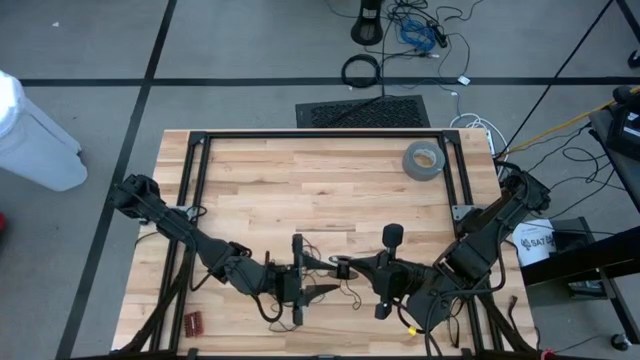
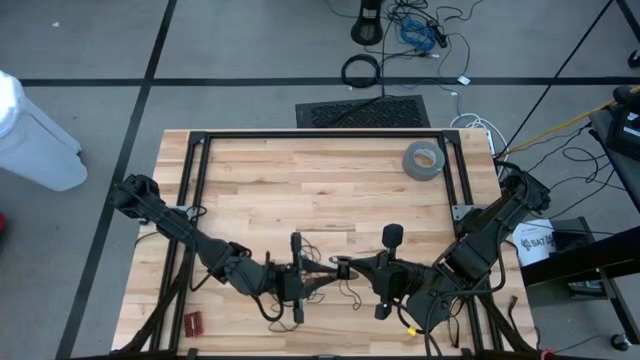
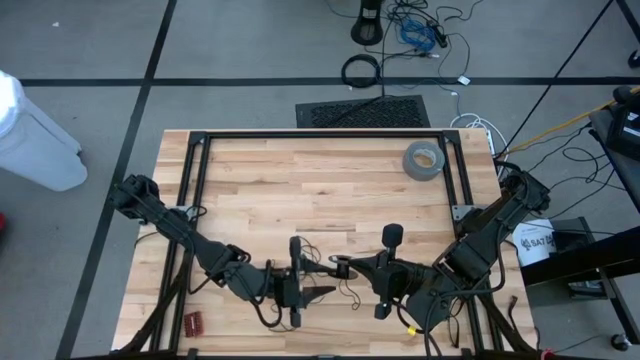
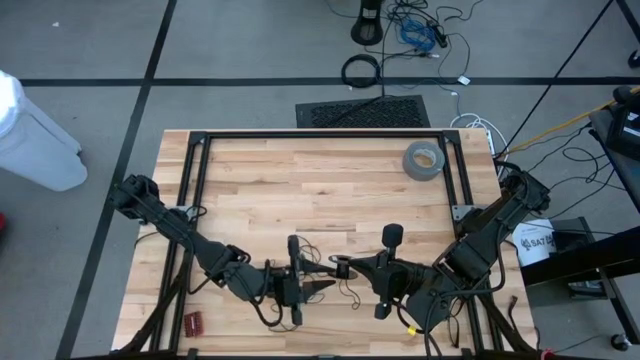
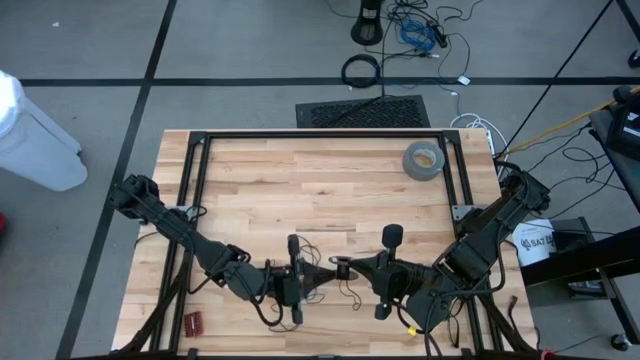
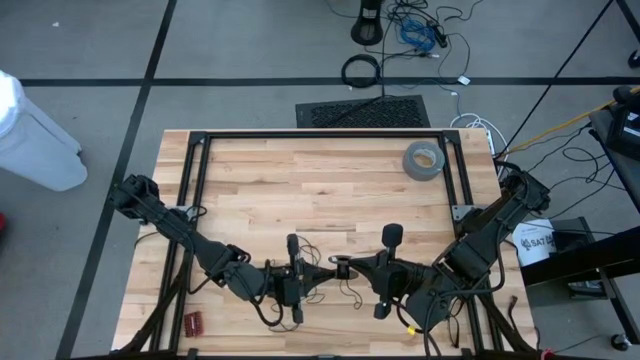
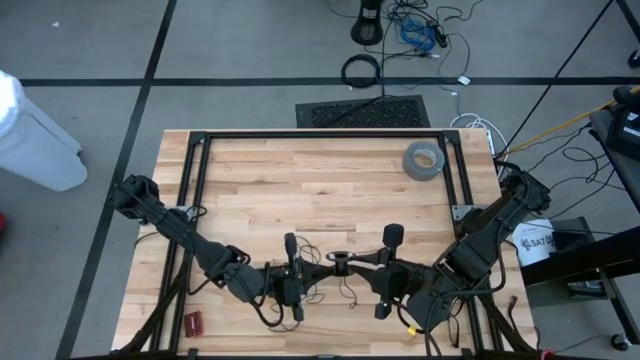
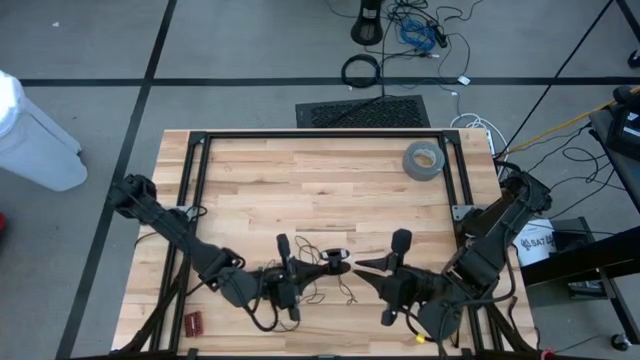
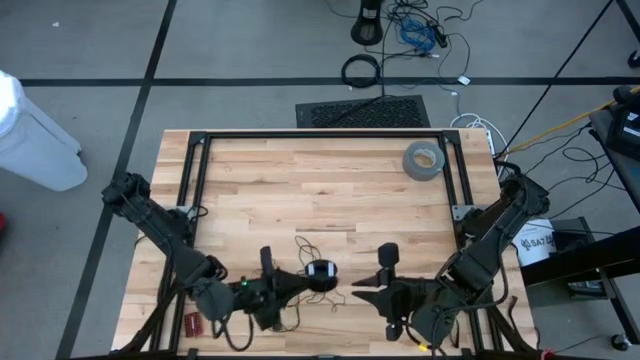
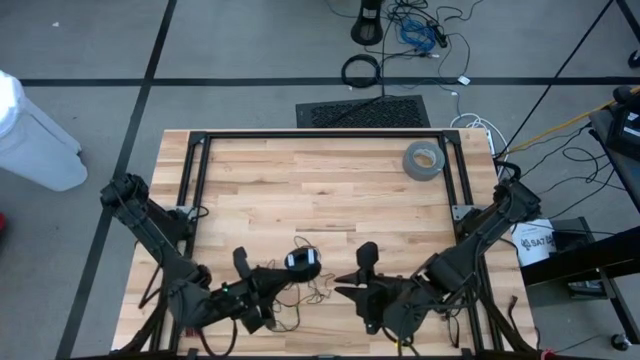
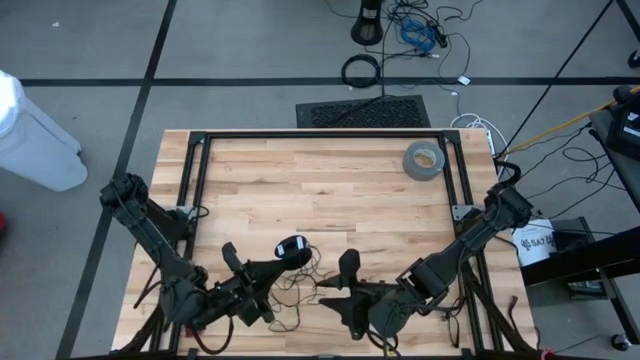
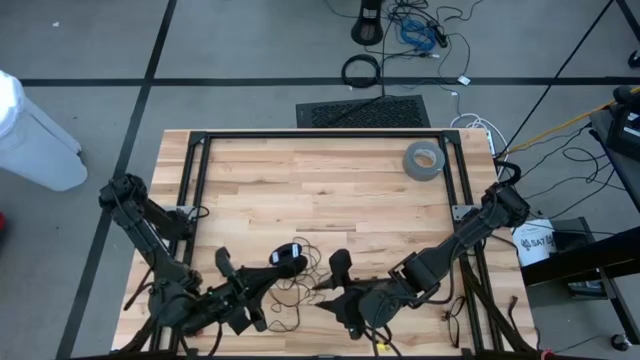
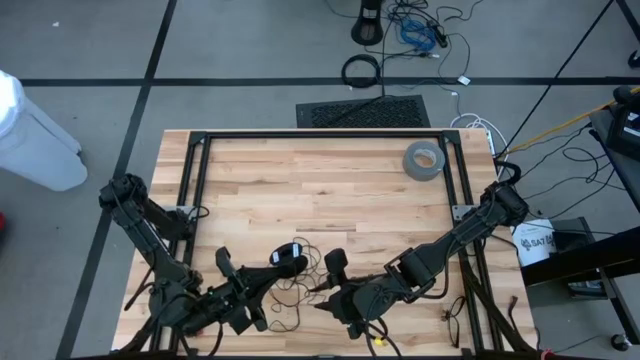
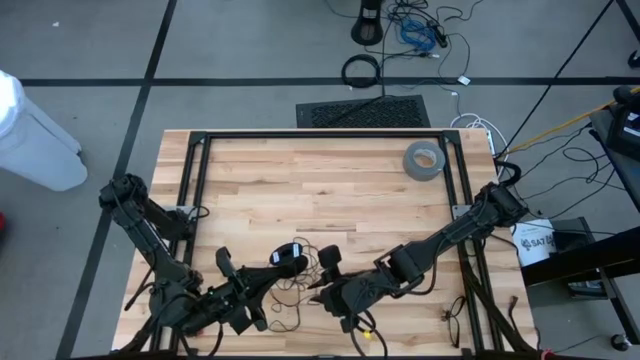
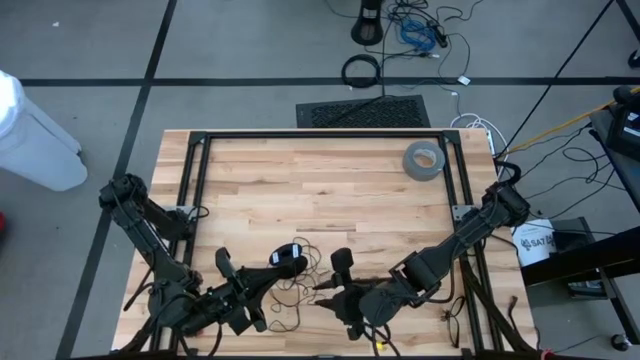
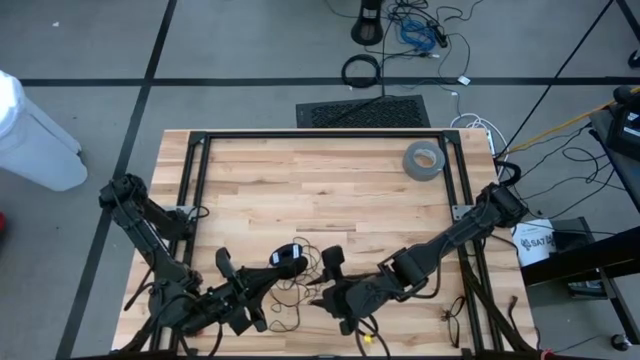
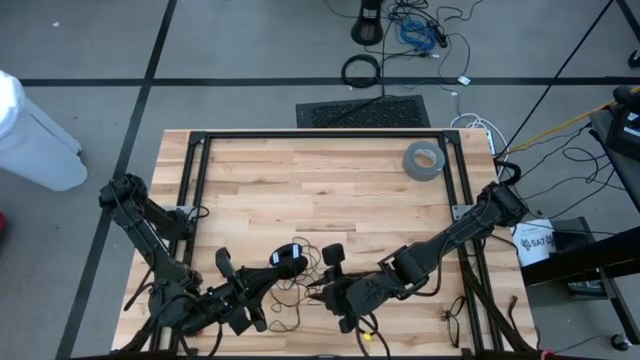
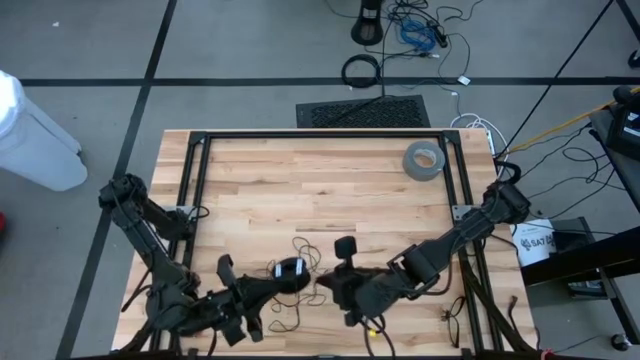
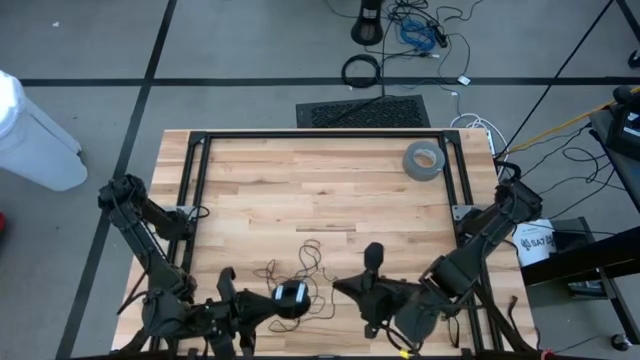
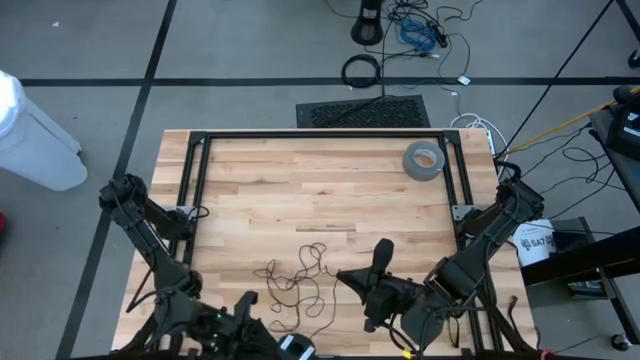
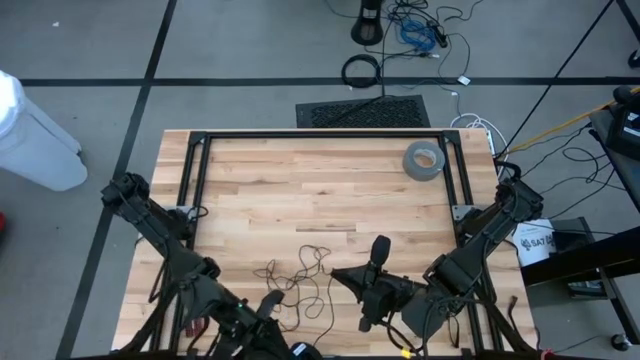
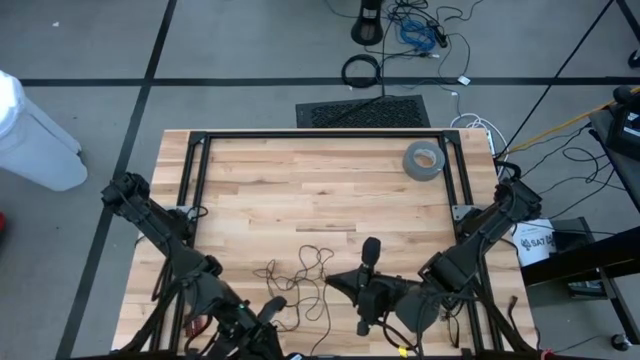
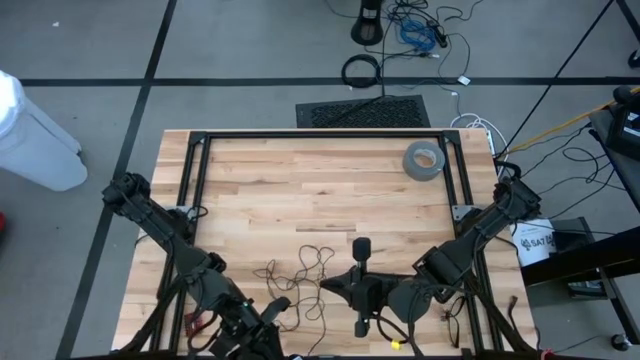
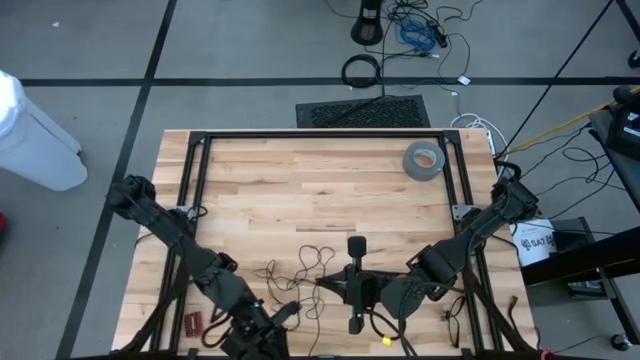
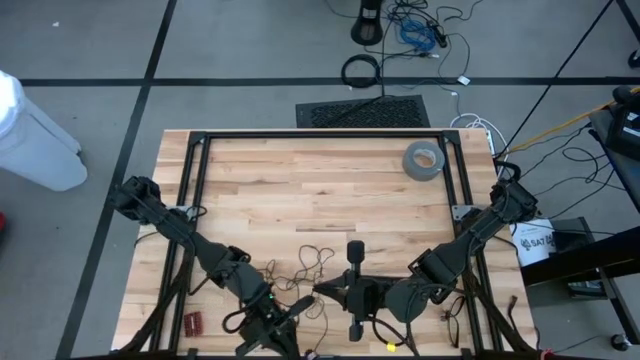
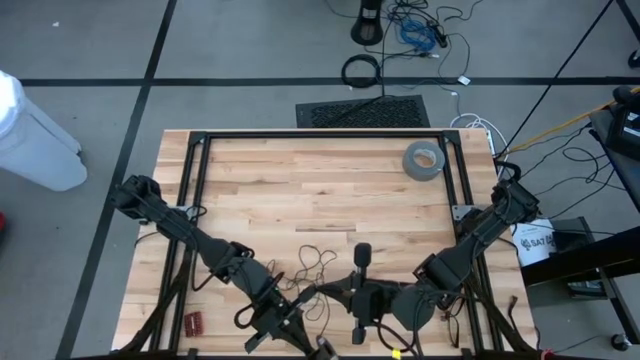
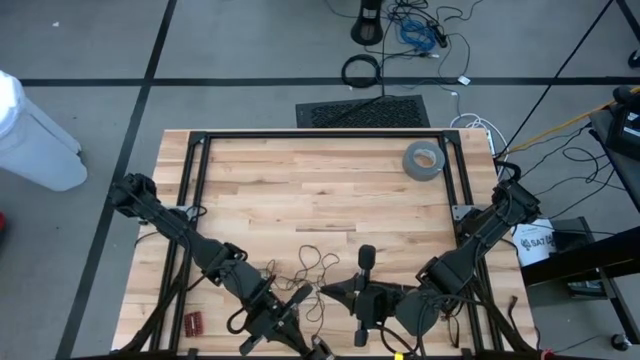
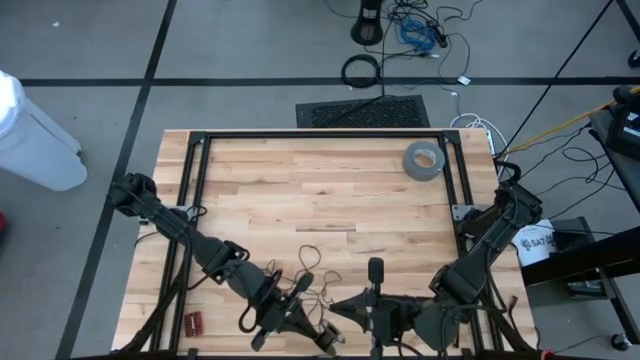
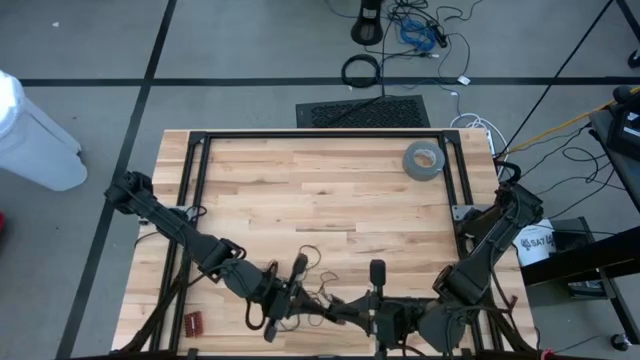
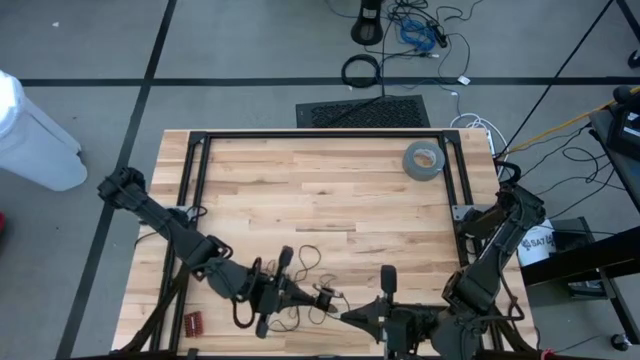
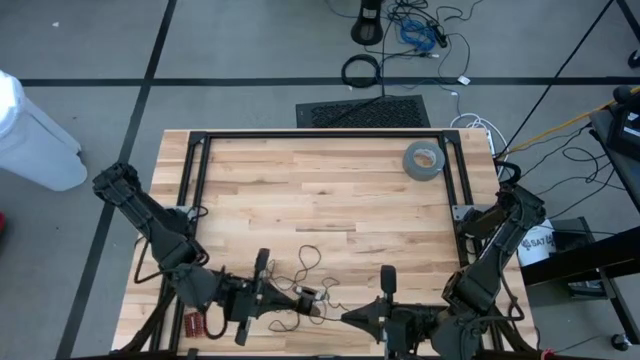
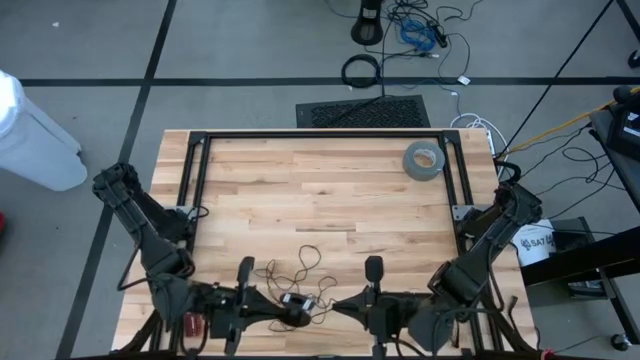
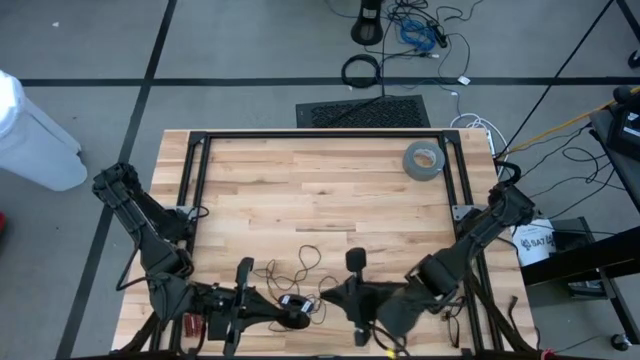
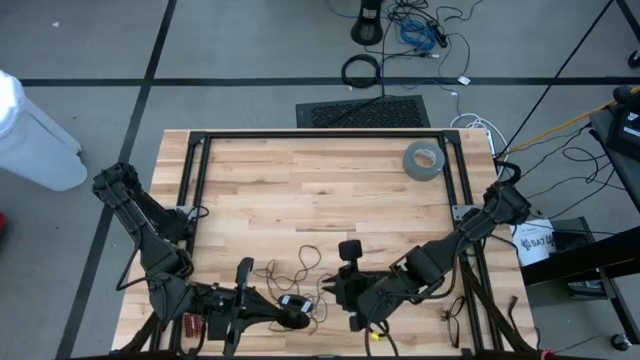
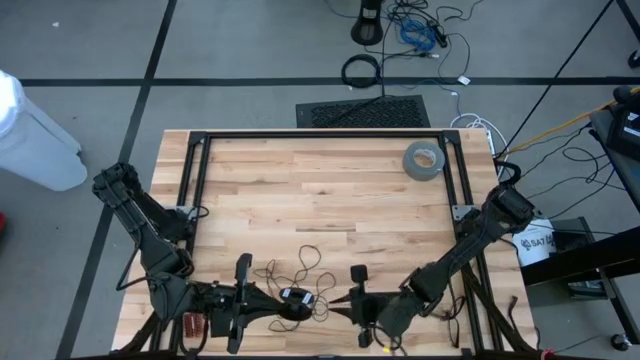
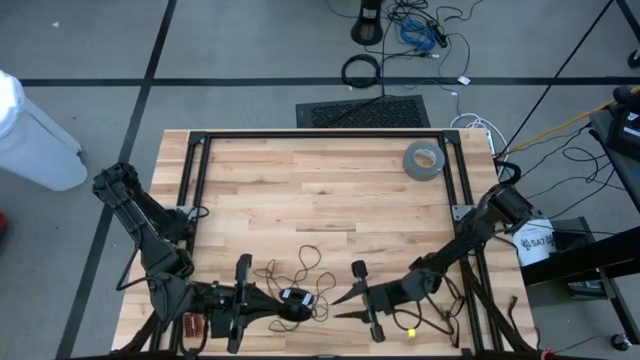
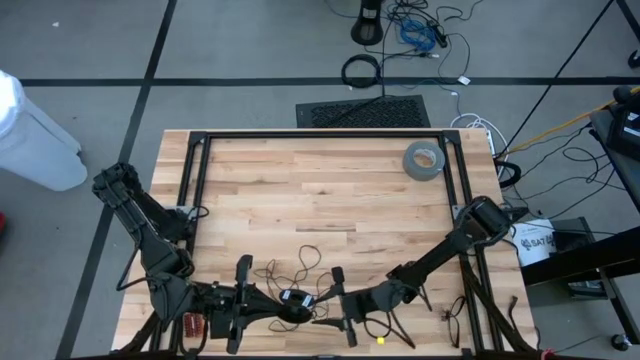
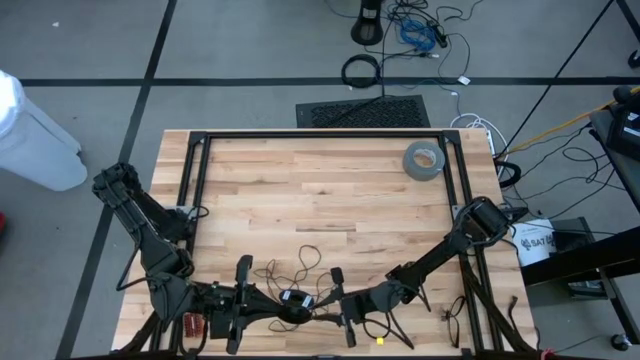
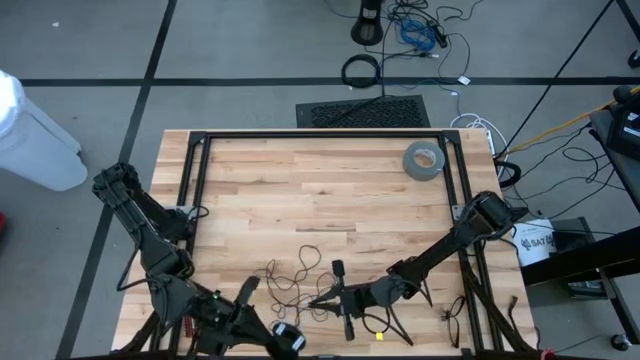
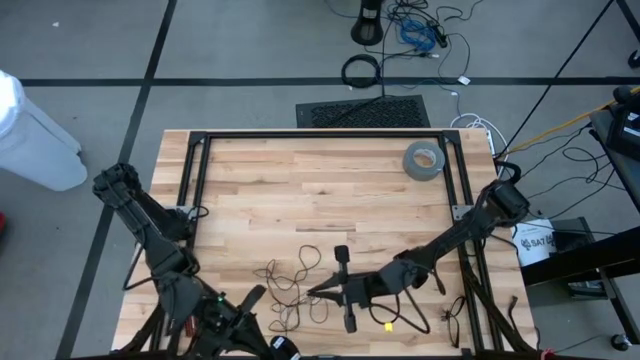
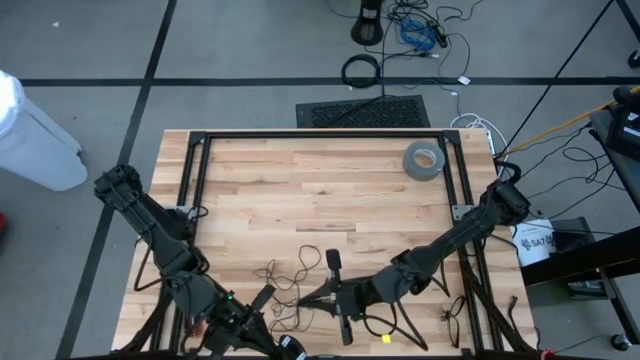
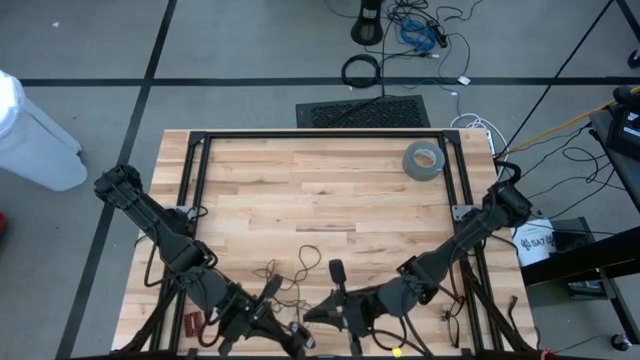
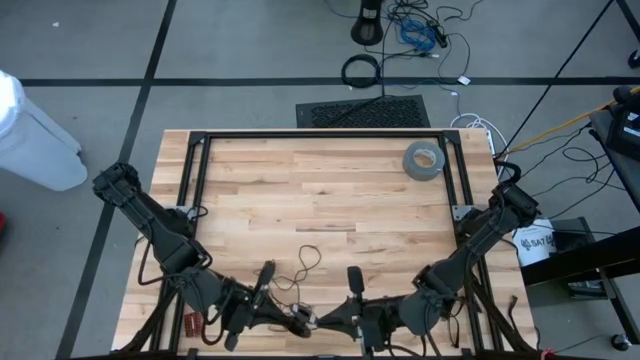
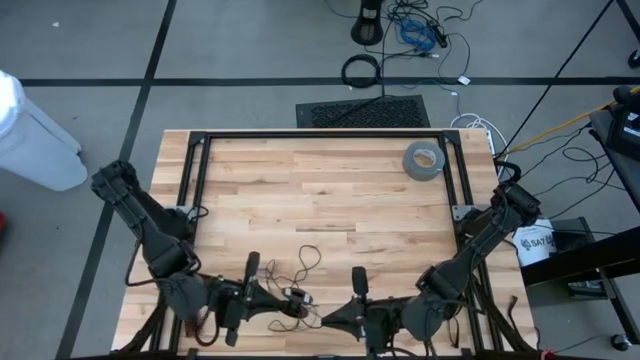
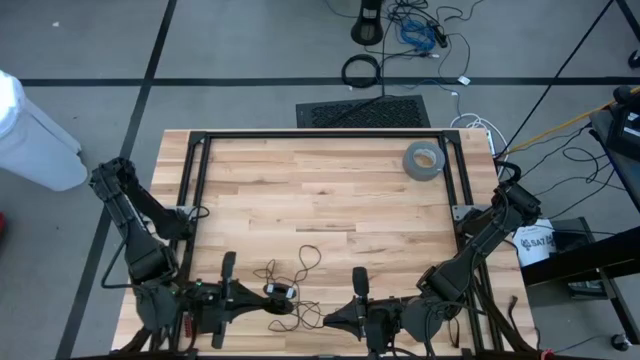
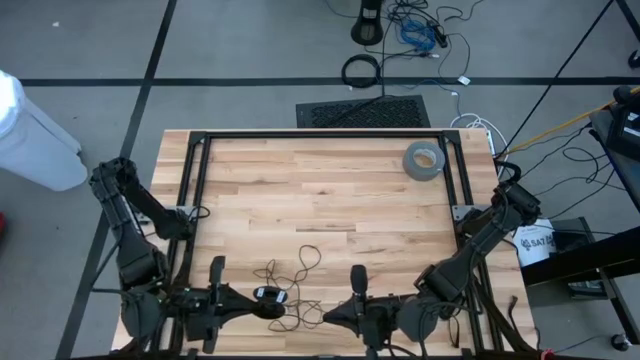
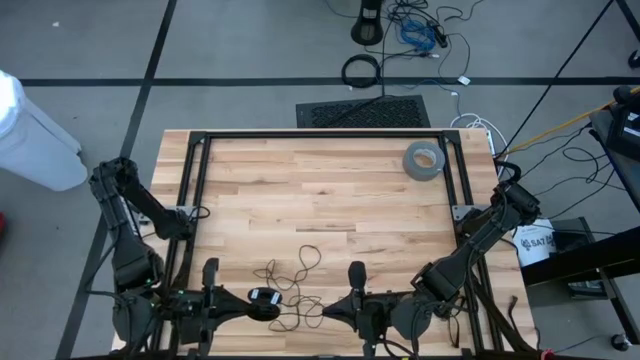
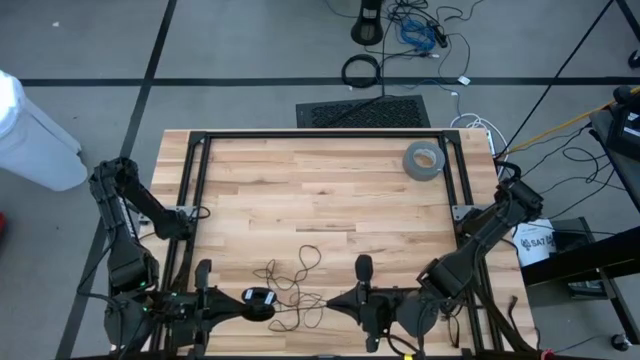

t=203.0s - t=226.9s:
Task: Coil cords
Coil the black wire onto the spool
